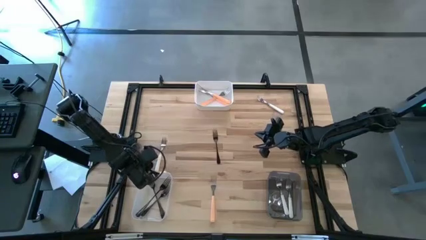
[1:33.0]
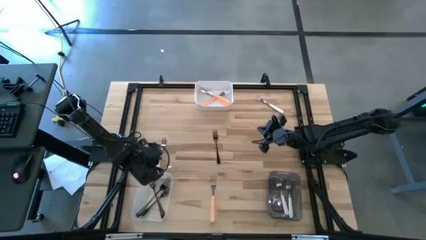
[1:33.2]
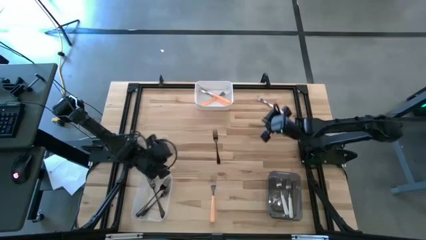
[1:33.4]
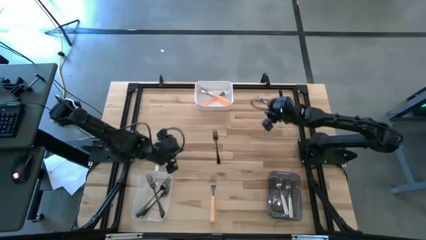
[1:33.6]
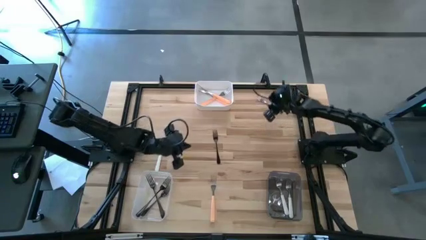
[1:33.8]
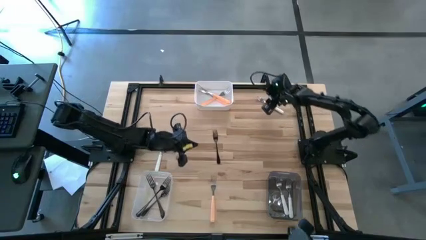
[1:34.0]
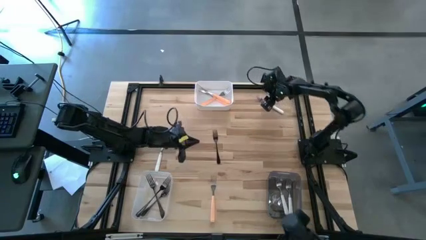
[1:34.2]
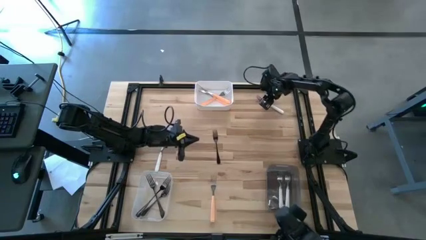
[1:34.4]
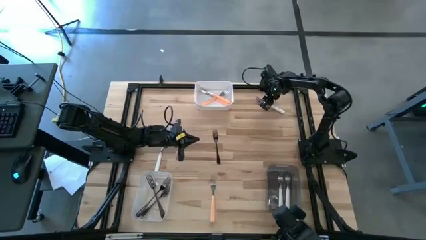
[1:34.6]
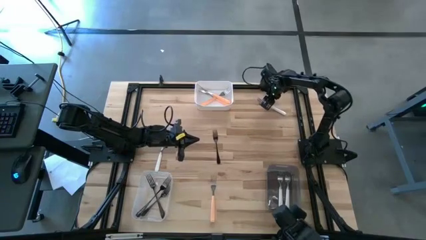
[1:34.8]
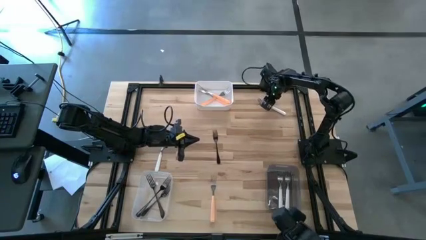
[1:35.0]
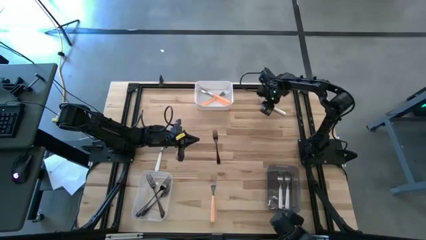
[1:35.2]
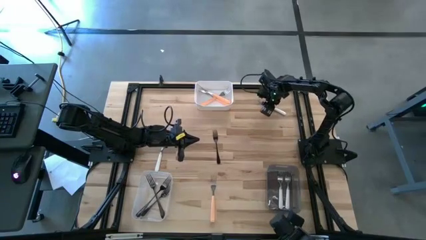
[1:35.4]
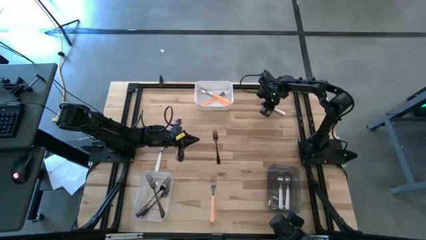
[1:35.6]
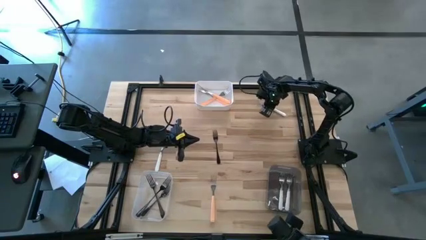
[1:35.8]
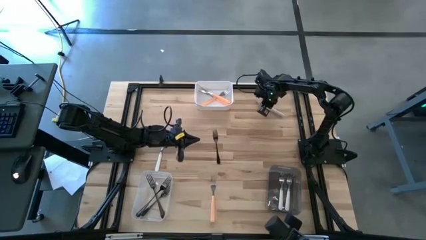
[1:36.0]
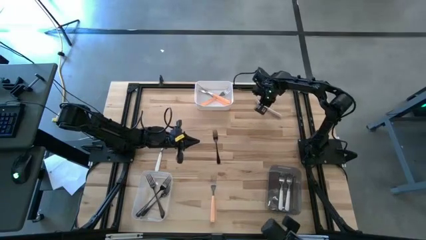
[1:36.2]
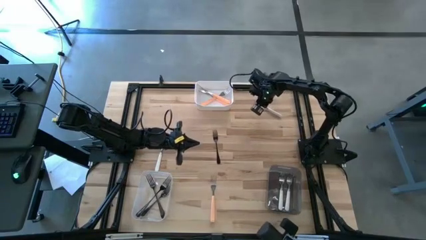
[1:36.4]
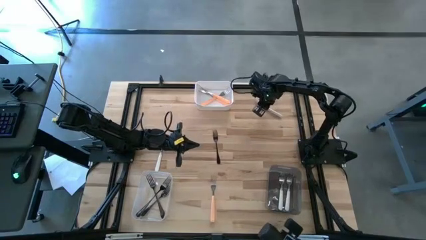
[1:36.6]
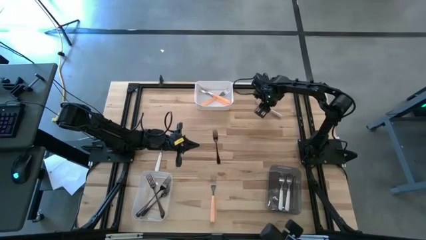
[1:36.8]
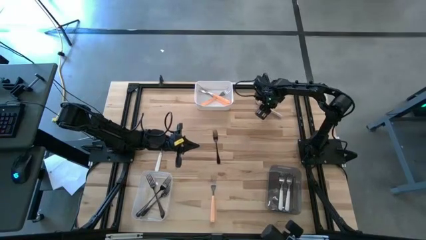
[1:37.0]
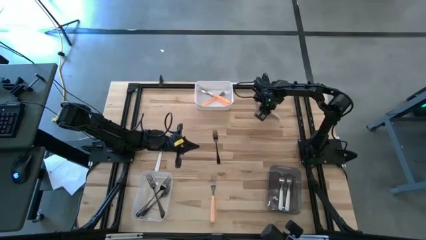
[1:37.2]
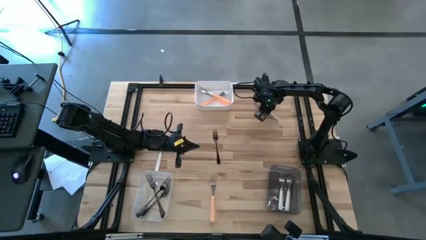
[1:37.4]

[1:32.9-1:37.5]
Task: Sort silverware by color (type)
Put the top white fork into the black bin

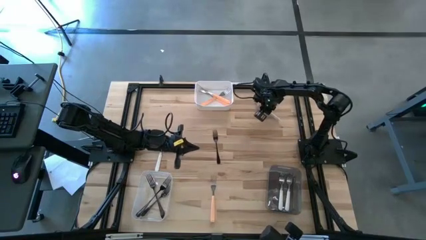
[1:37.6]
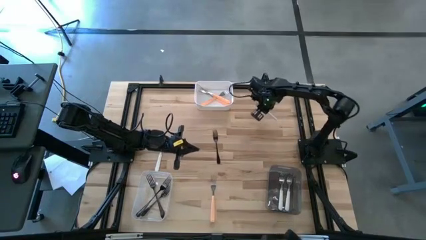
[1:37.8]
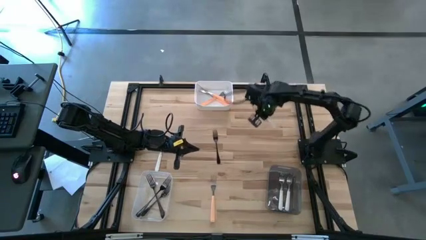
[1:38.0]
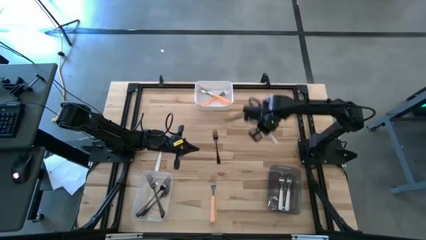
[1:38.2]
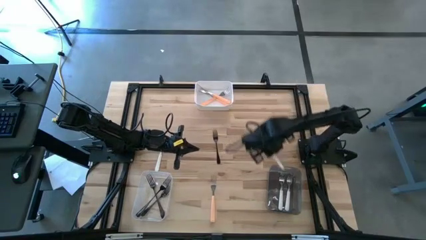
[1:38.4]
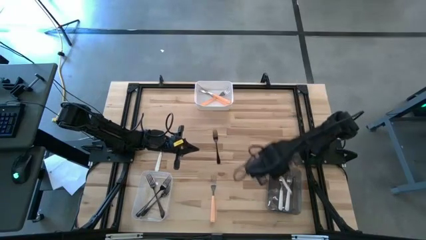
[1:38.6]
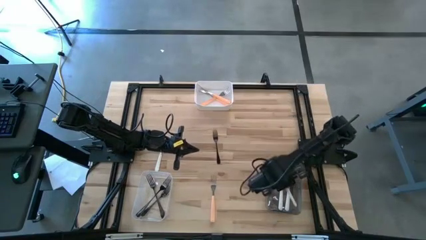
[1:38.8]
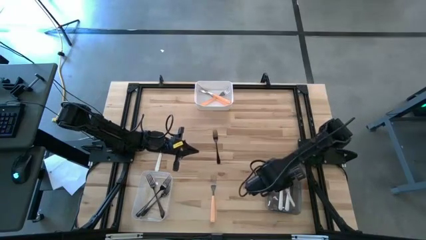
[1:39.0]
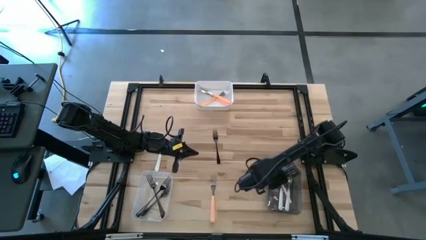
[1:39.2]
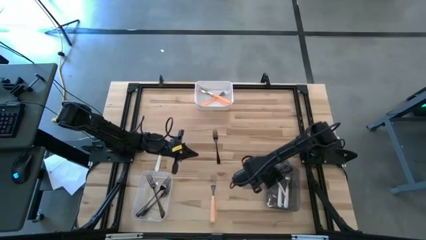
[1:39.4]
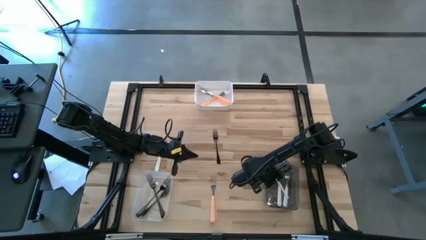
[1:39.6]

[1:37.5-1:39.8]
Put the top white fork into the black bin

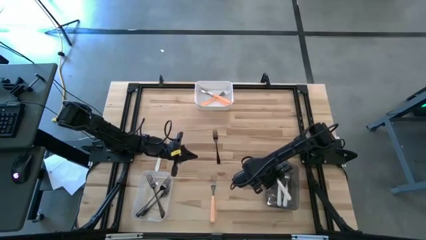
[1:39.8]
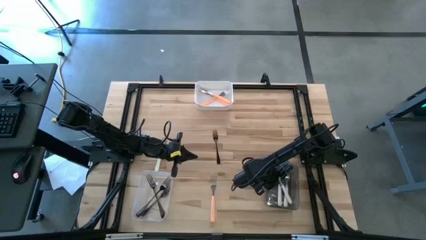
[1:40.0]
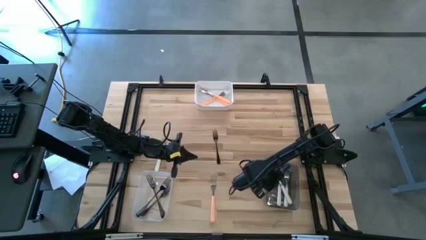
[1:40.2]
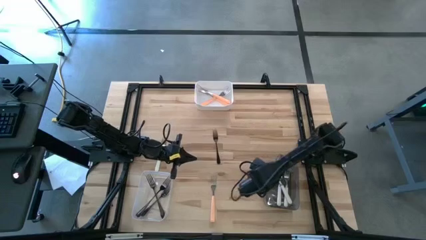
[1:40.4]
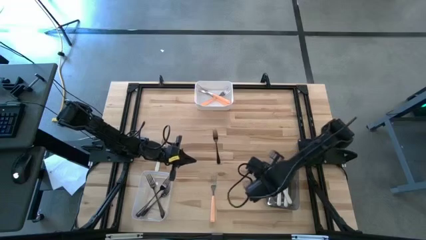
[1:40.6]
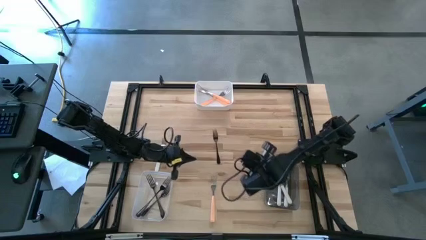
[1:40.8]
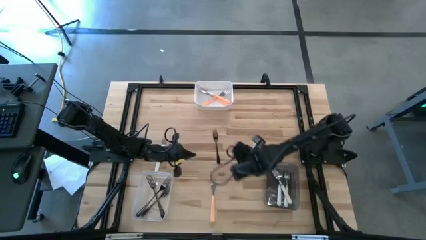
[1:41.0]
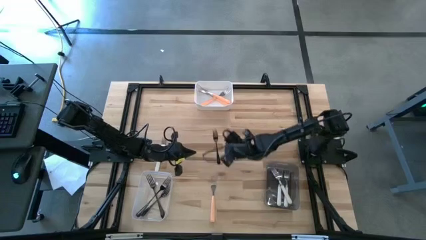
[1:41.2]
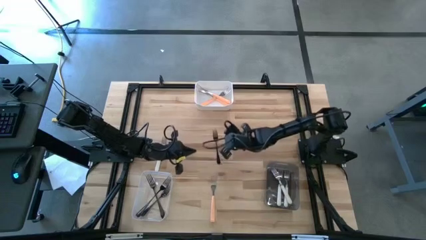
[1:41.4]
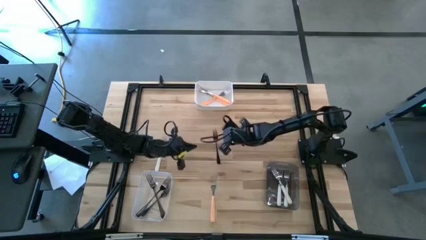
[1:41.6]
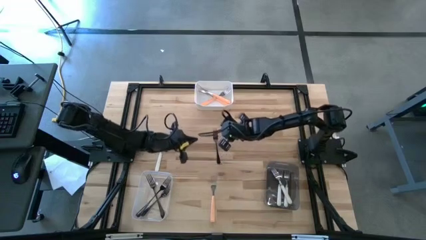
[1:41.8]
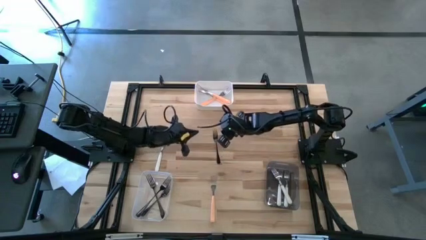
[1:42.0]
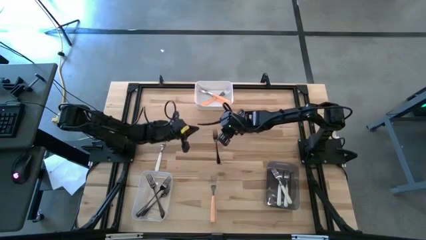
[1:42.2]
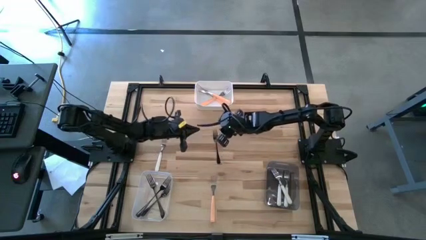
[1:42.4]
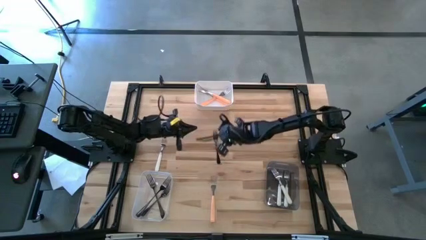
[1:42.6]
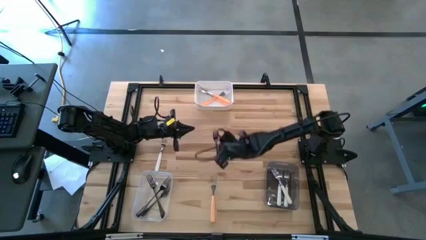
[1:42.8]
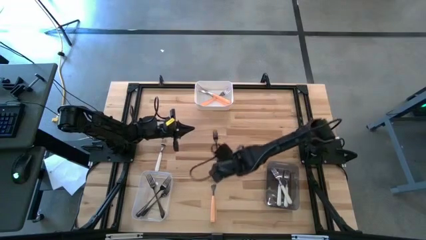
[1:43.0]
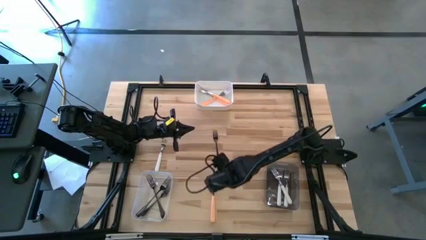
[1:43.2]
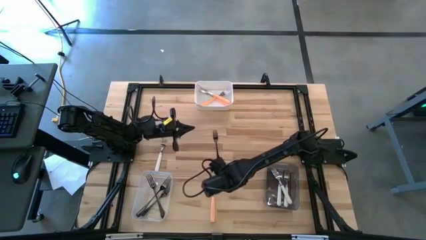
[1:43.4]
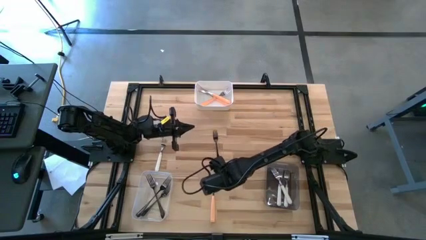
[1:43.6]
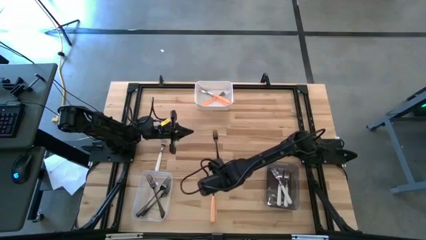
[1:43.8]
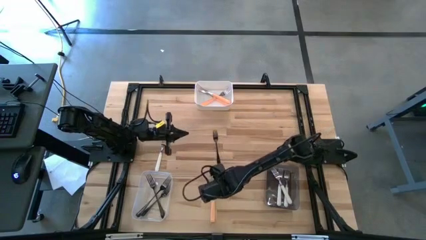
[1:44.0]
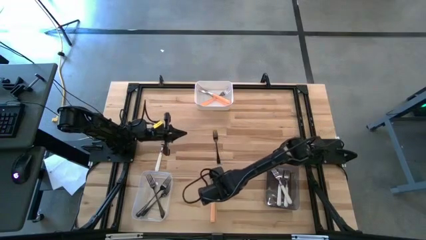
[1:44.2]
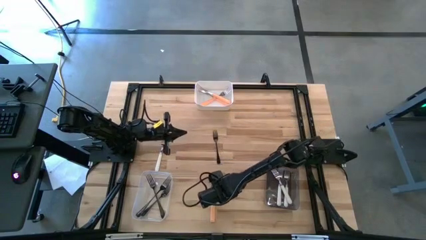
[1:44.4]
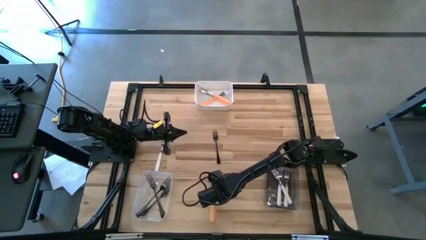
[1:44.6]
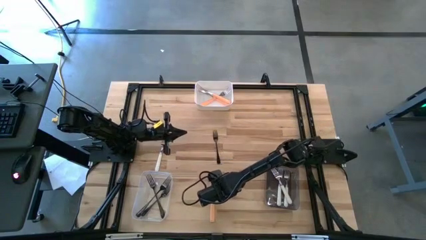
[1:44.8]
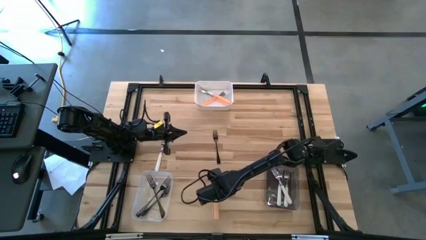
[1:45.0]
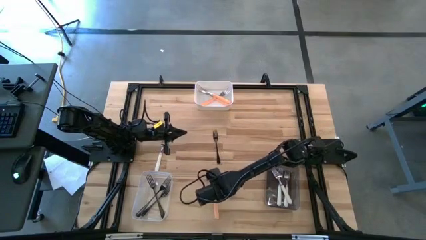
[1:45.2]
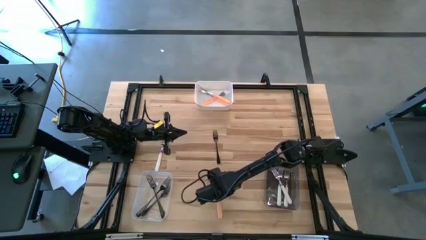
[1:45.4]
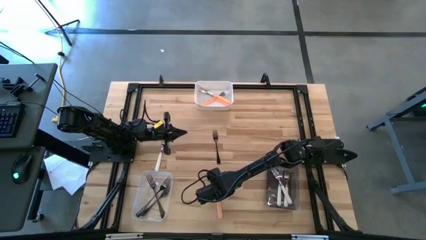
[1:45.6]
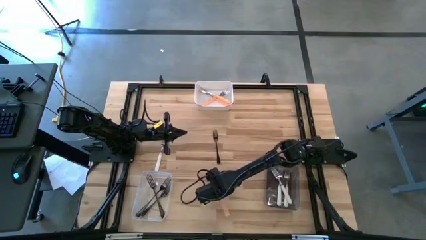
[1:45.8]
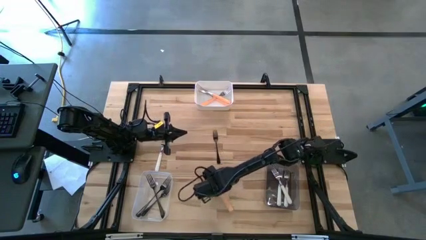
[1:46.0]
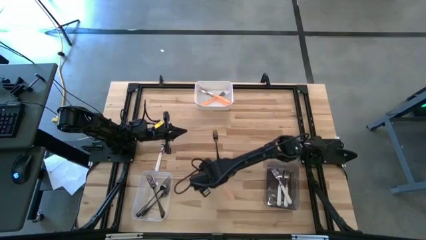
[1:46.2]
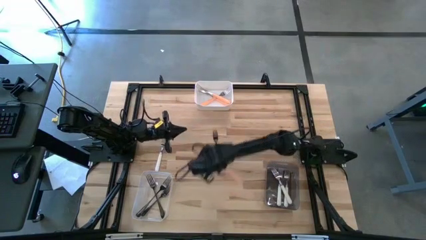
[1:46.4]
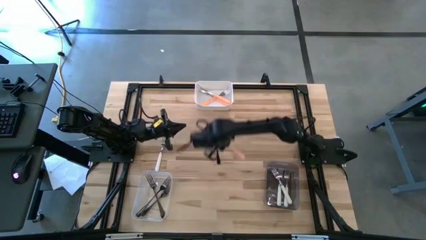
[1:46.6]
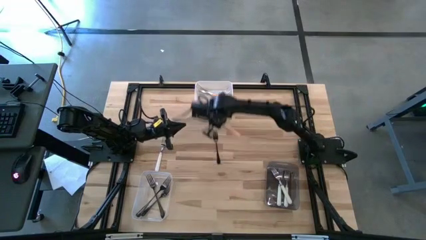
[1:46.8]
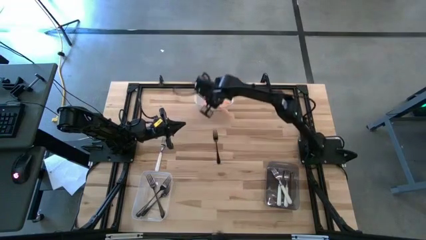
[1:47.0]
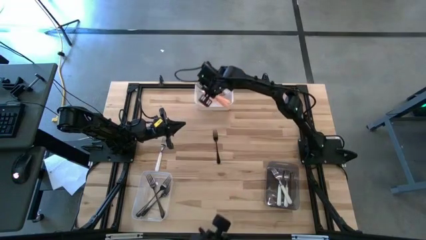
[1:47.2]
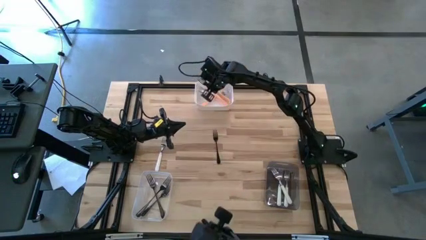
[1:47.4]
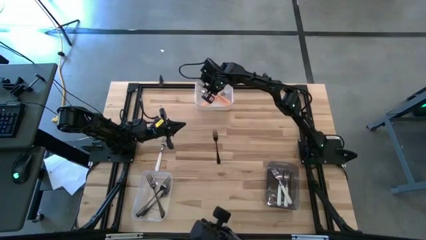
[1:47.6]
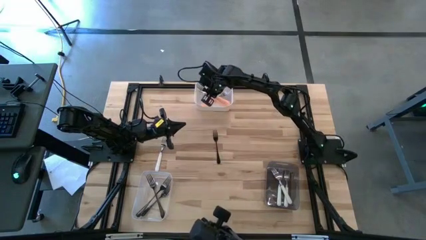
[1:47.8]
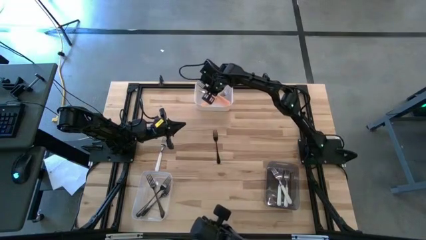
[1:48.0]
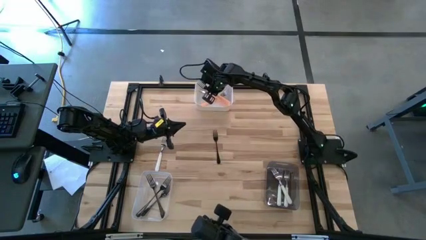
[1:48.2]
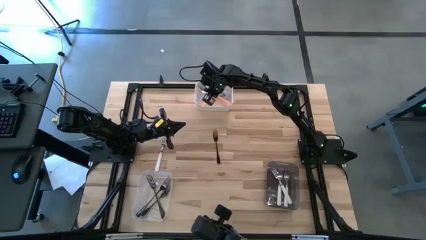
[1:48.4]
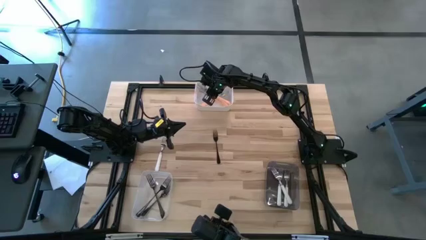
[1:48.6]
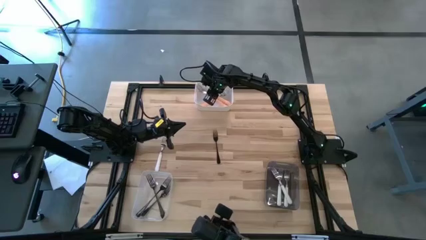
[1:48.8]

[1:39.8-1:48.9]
Put the orange fork into the white bin

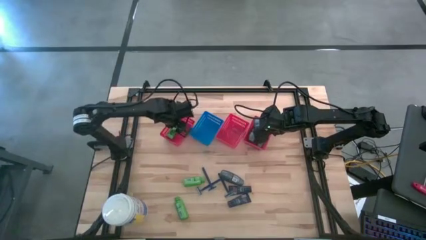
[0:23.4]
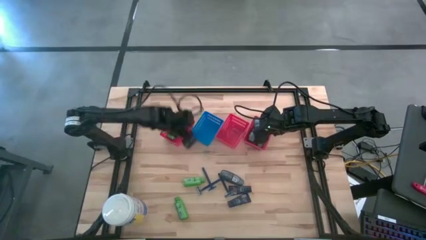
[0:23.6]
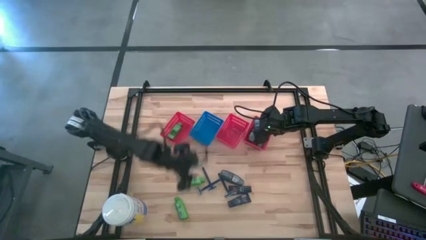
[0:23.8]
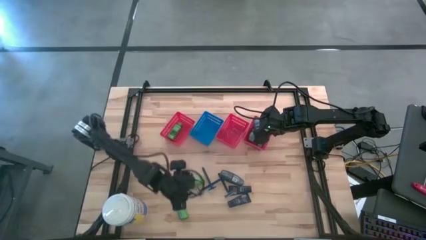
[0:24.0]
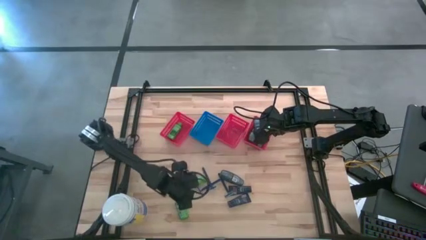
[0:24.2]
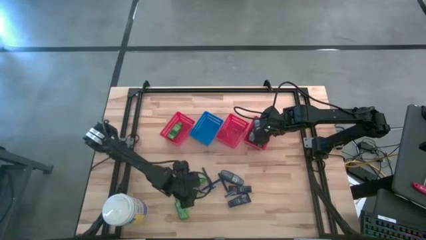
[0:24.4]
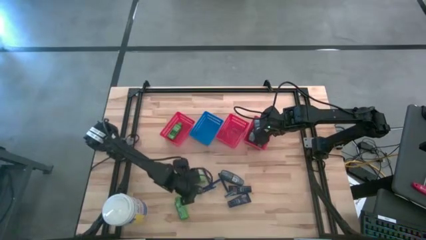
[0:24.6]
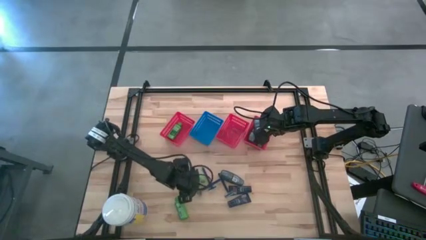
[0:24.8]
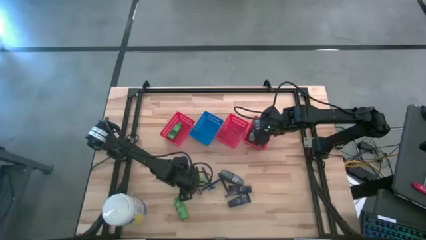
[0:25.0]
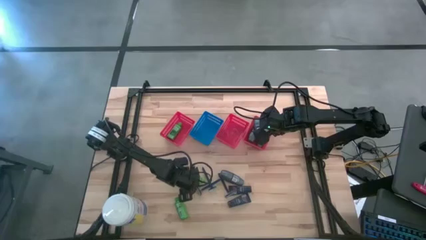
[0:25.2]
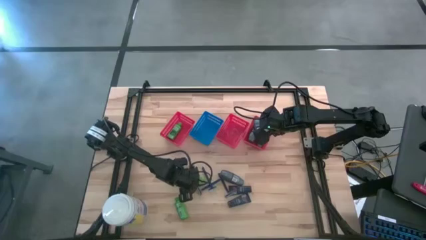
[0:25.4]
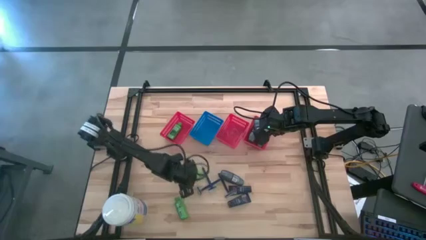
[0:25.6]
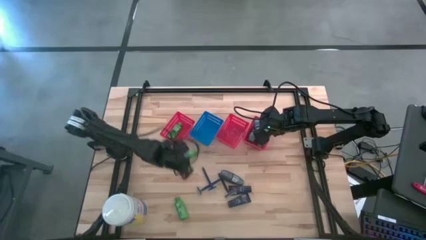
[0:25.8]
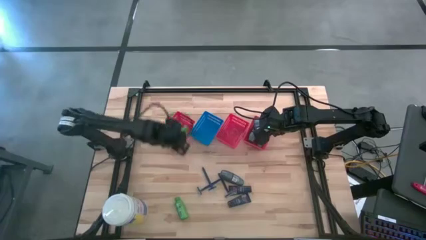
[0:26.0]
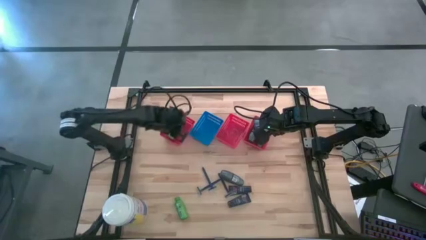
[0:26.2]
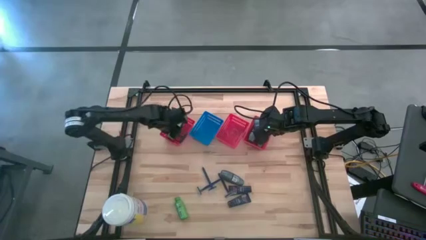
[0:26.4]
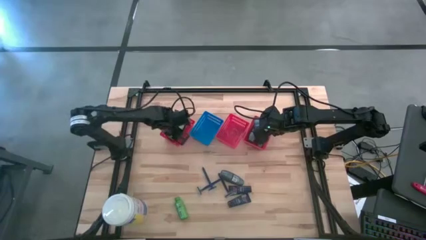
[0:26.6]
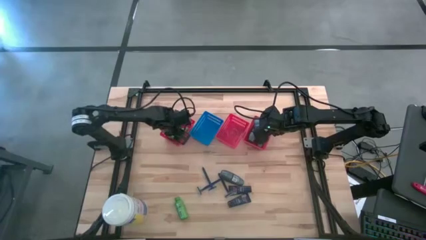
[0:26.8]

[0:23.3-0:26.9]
Task: Pick & Place Travel size toiletries
Put the green shampoo into the left red bin
